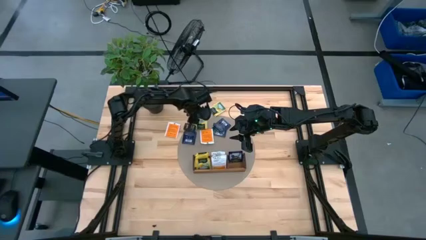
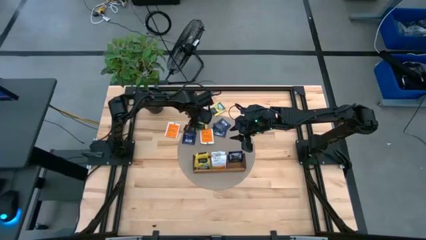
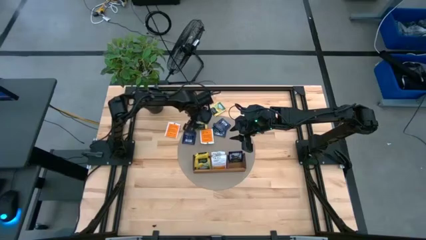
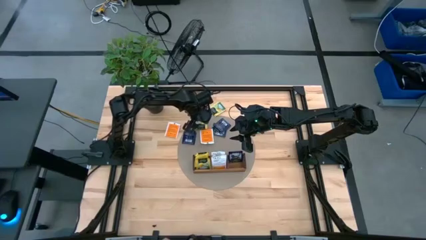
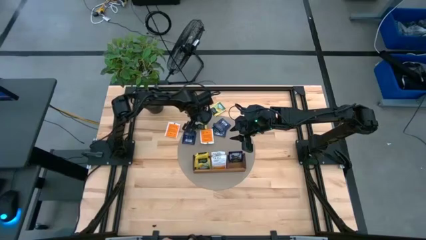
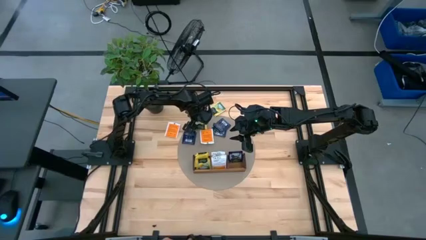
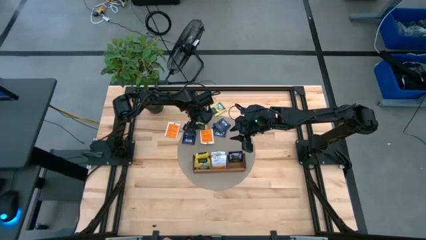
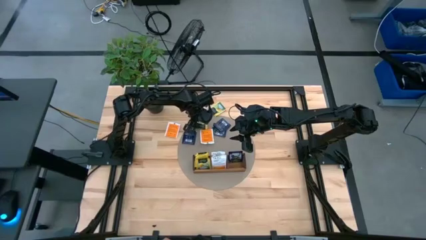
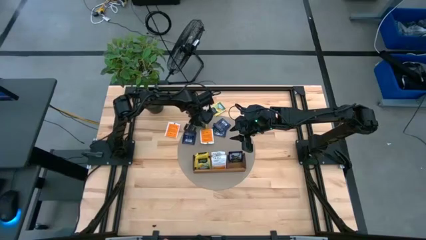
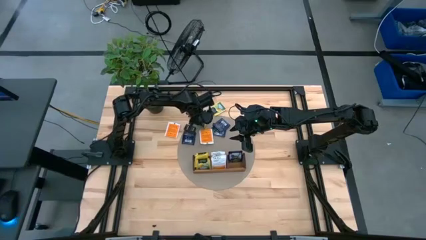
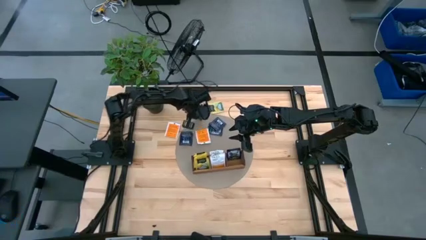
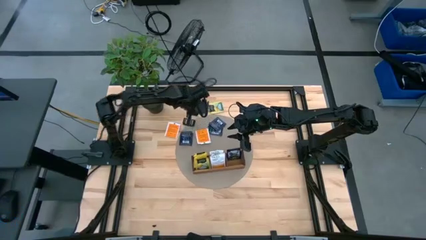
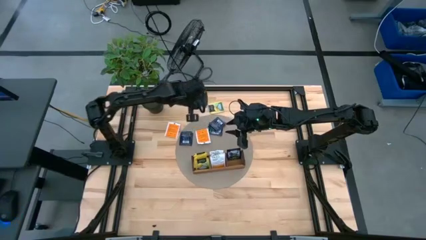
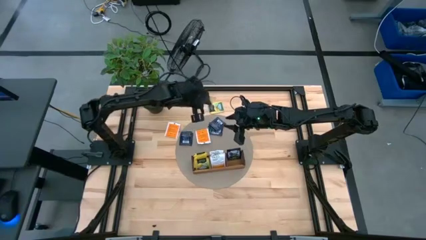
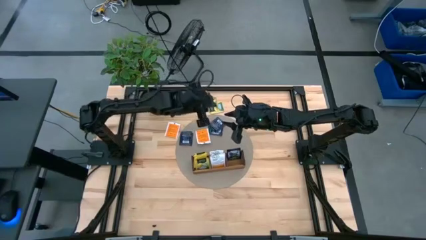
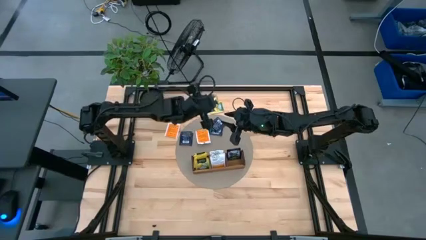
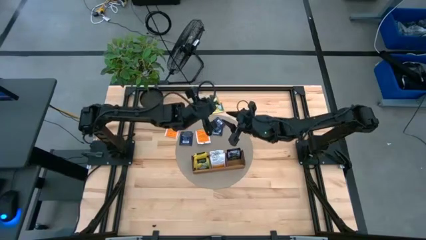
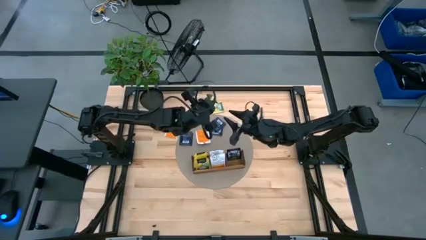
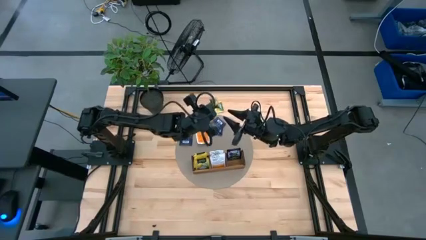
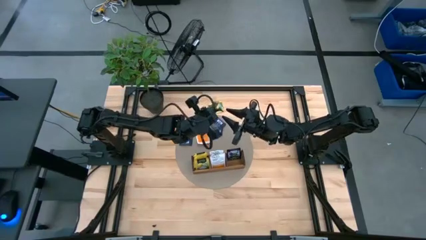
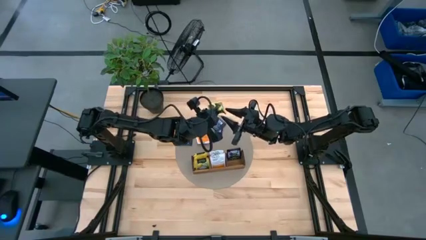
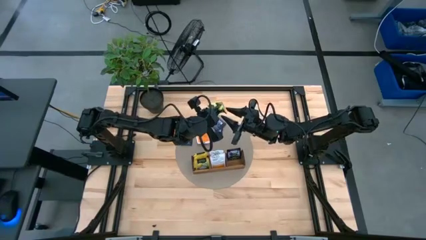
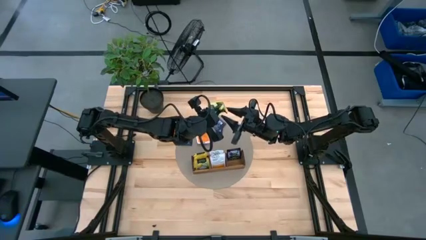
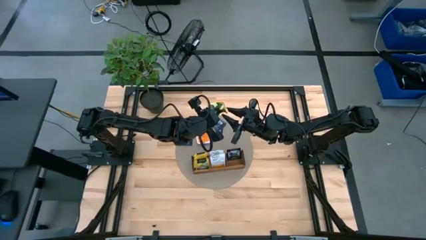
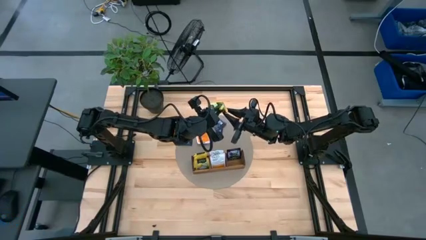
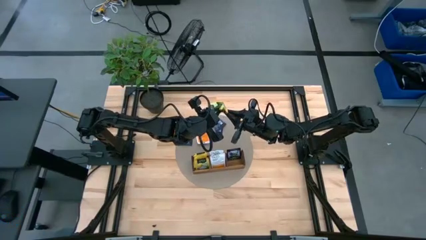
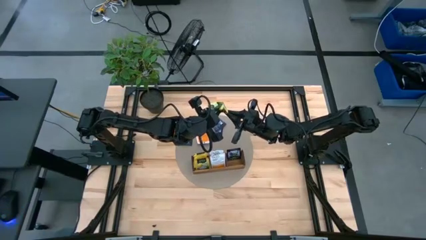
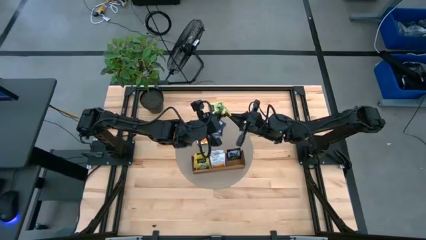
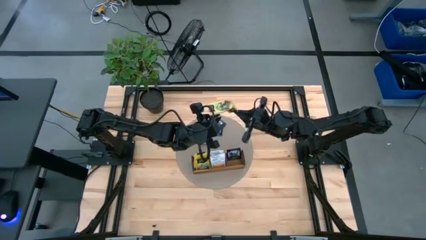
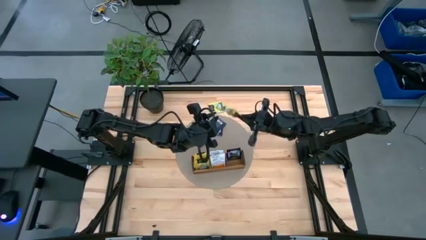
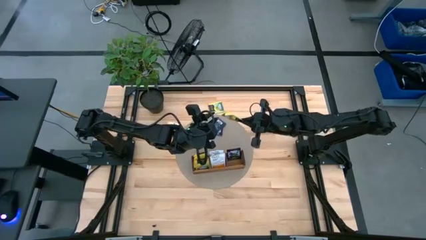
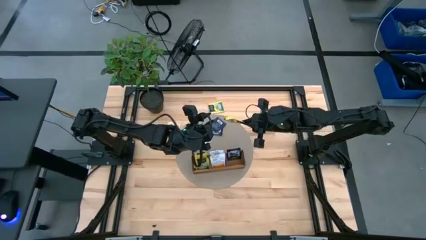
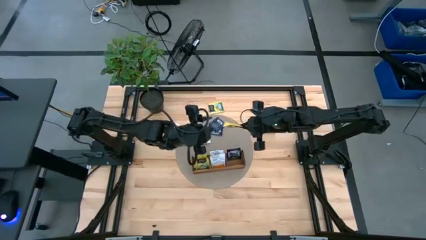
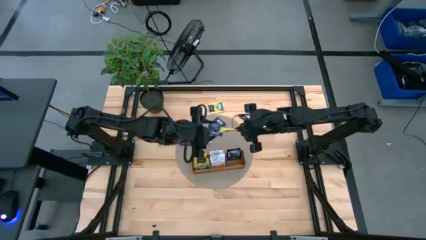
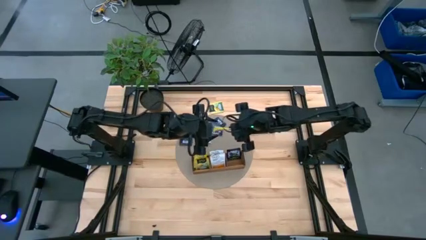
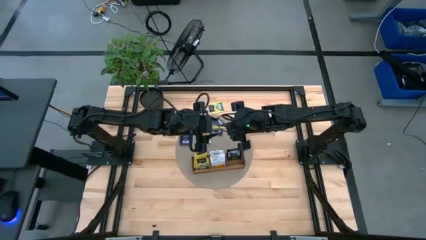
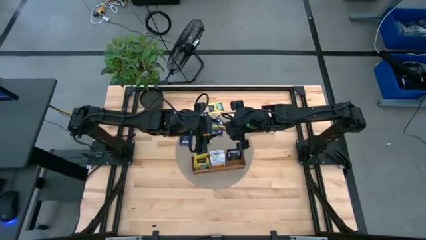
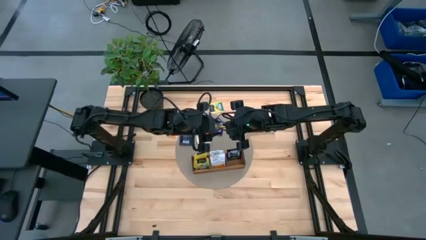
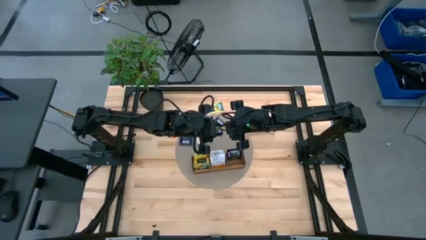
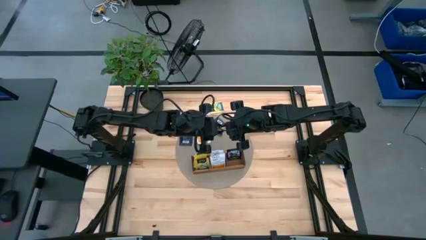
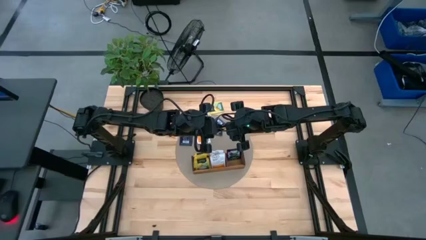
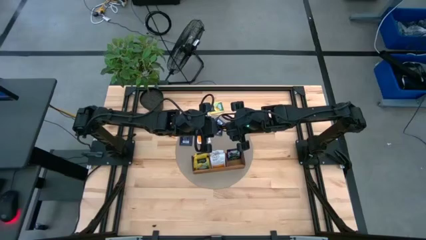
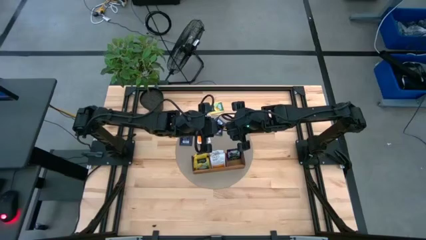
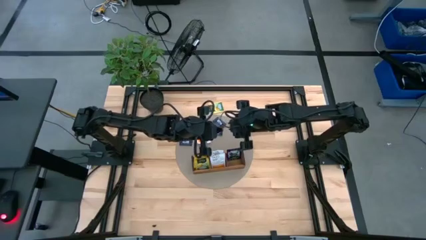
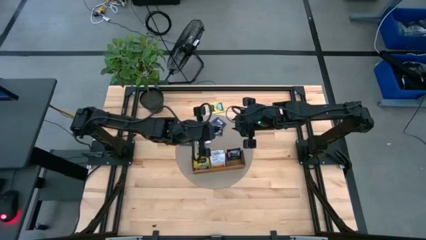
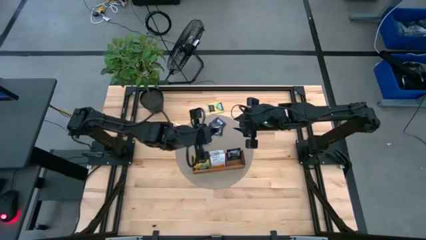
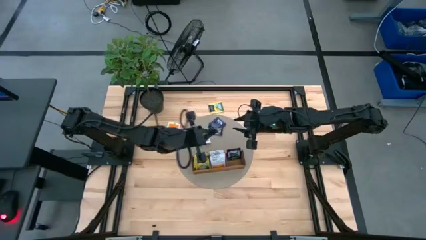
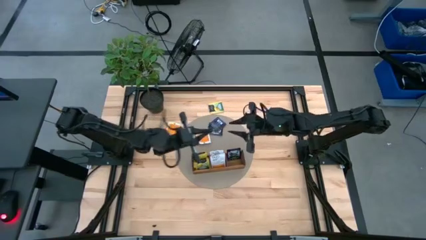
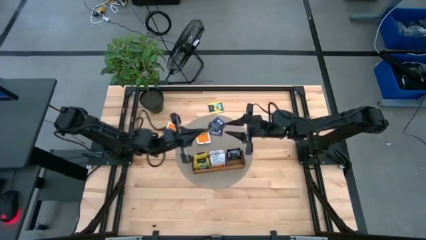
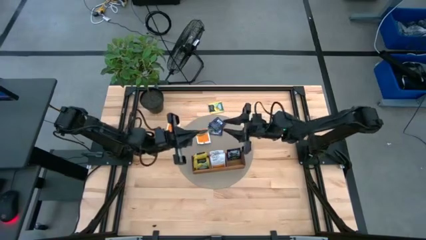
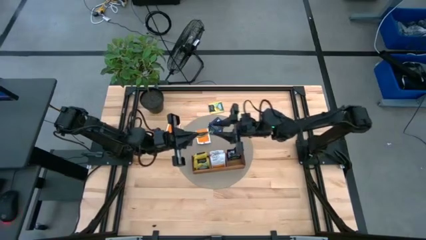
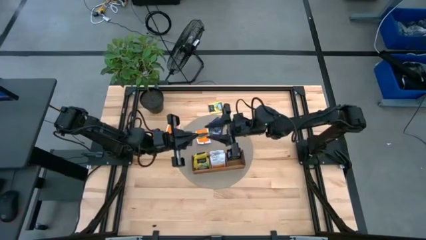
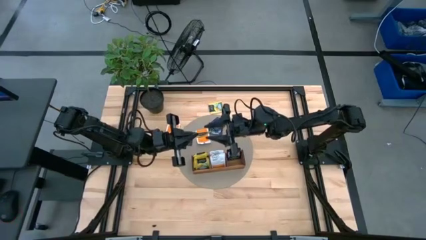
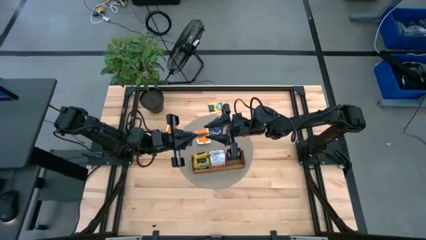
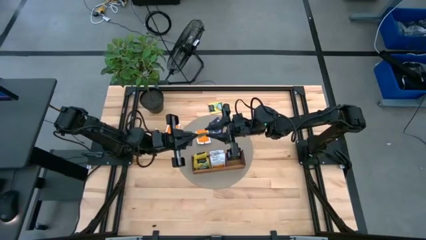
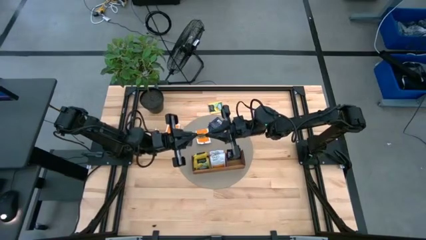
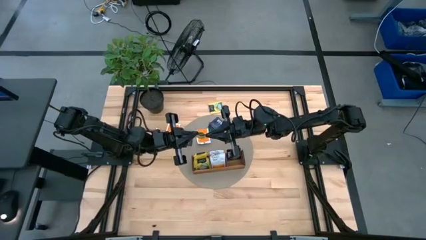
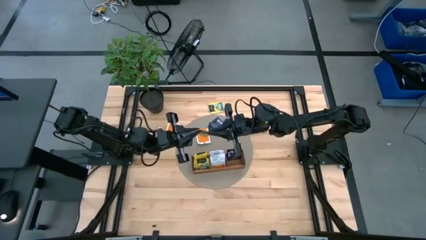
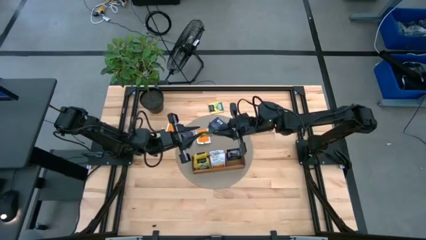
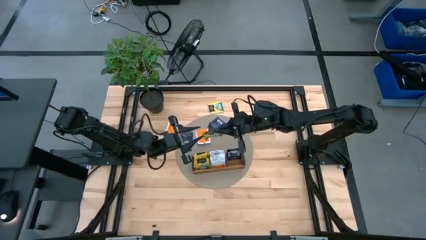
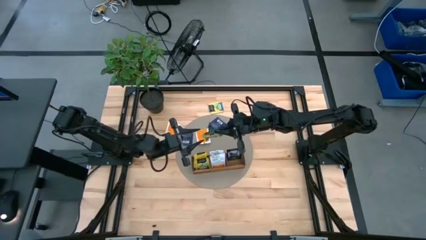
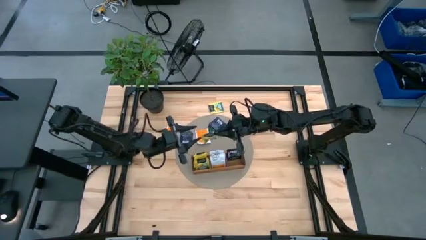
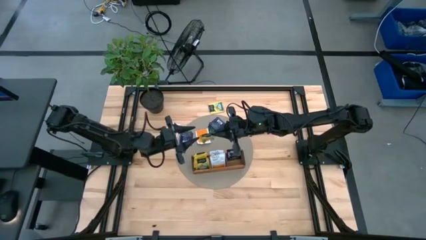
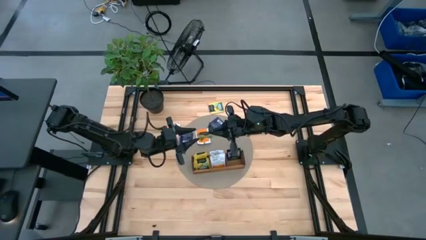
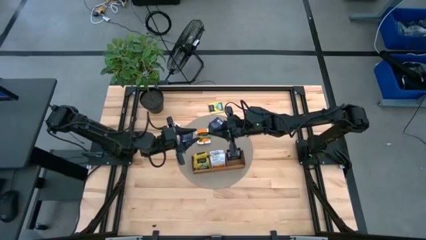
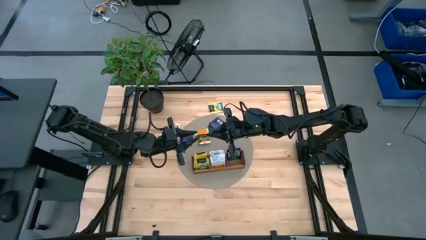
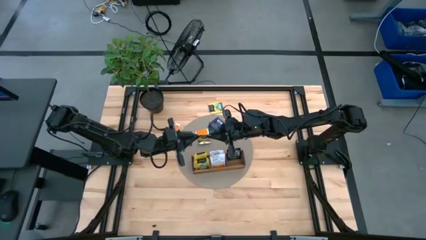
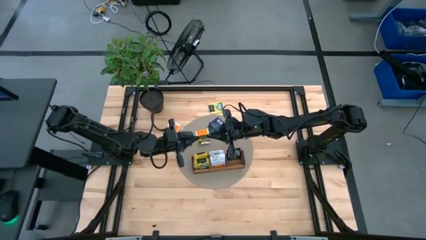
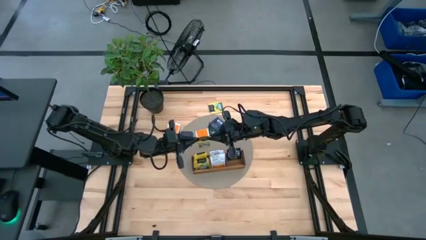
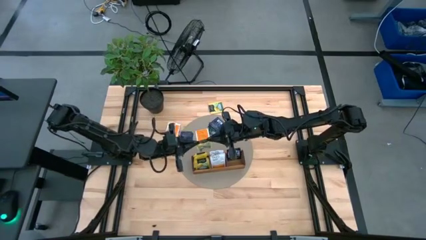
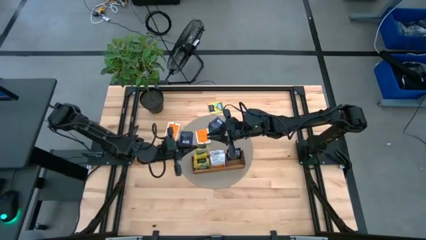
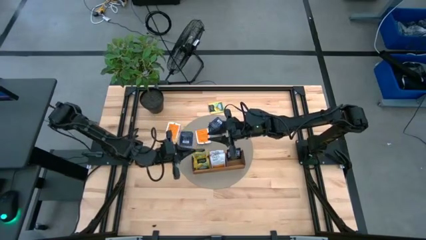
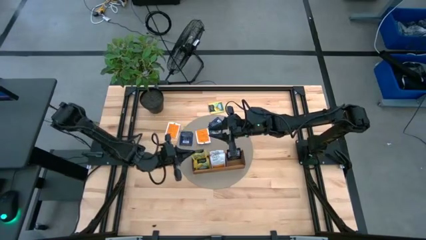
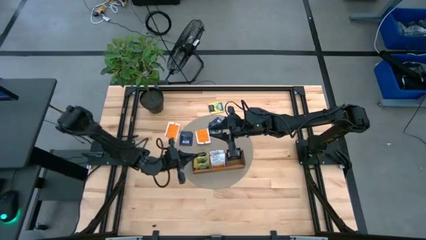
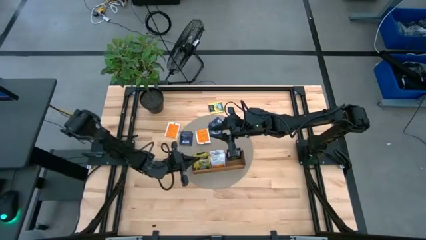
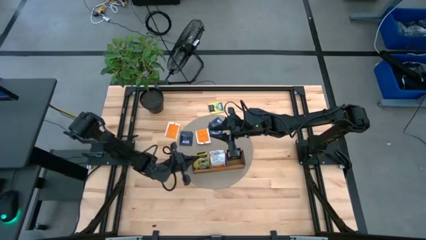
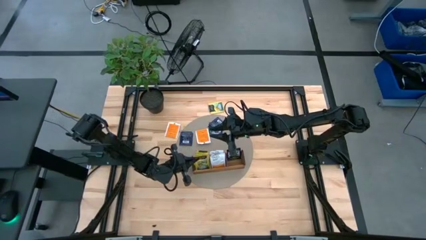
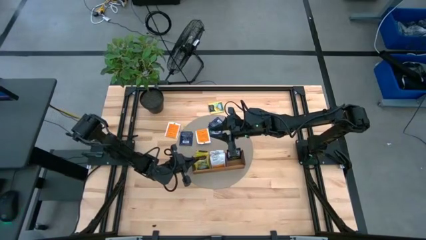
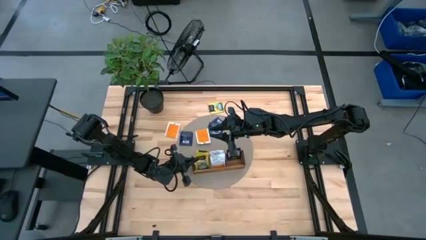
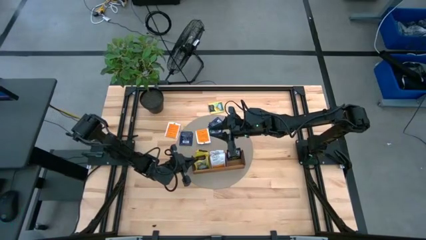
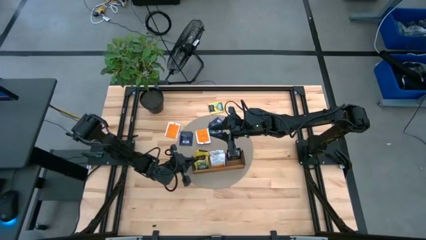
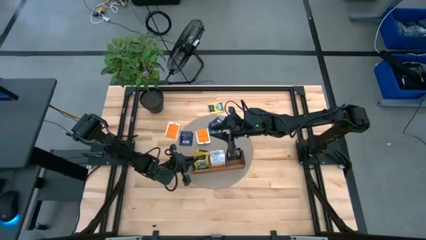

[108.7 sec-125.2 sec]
Task: Pick & Place Tea
Put the yellow tea bag into the left section of the wooden organizer
